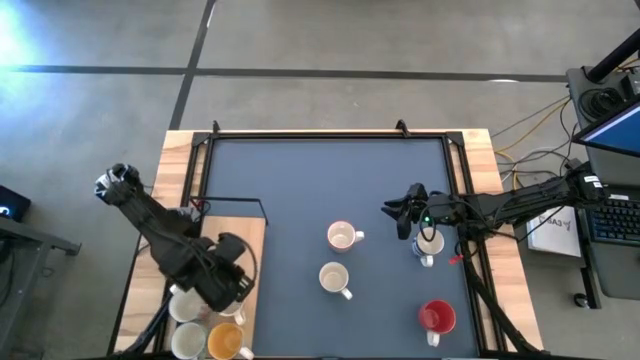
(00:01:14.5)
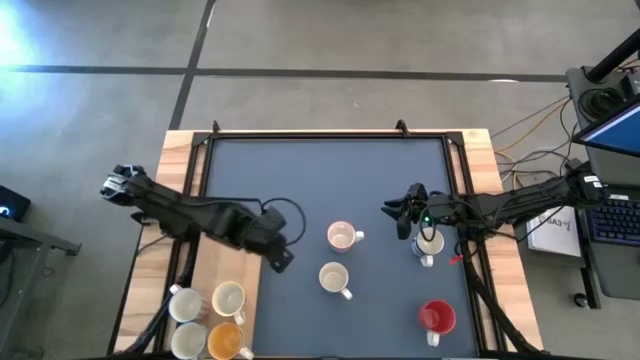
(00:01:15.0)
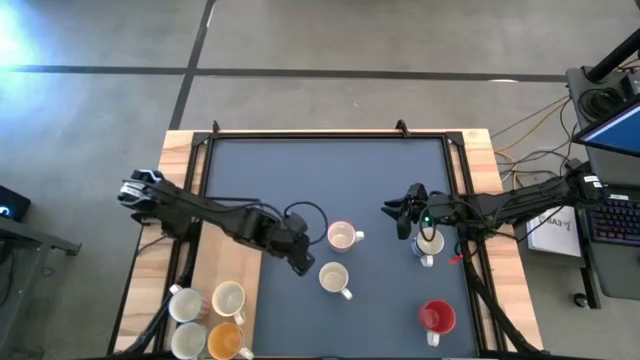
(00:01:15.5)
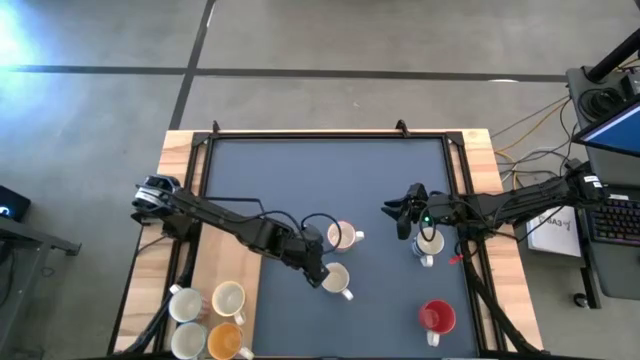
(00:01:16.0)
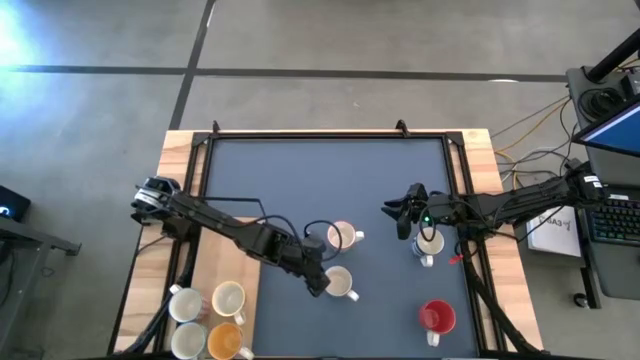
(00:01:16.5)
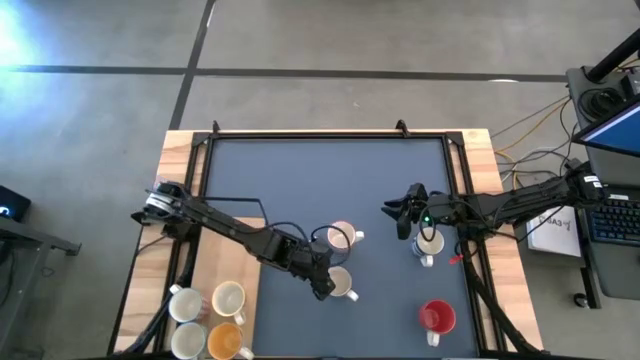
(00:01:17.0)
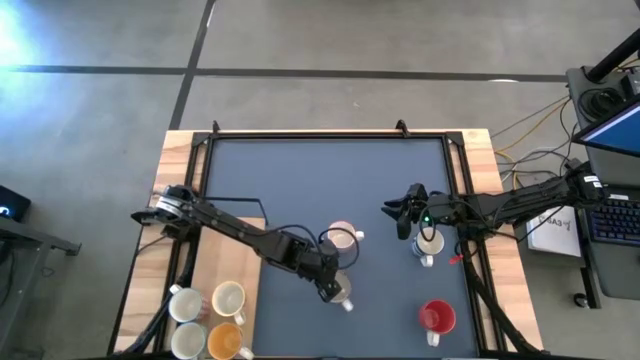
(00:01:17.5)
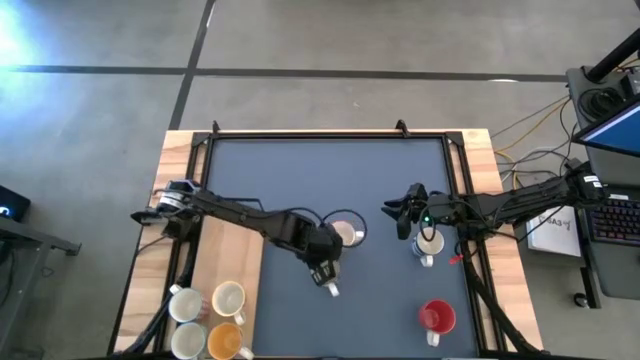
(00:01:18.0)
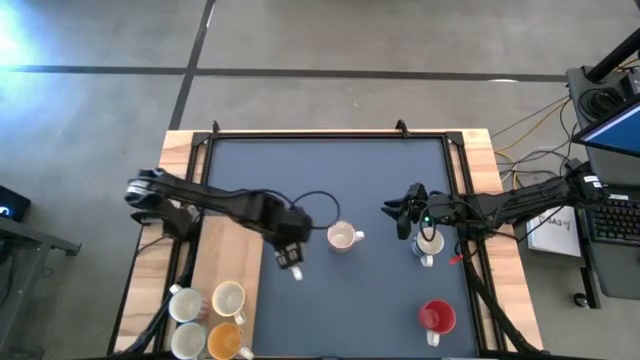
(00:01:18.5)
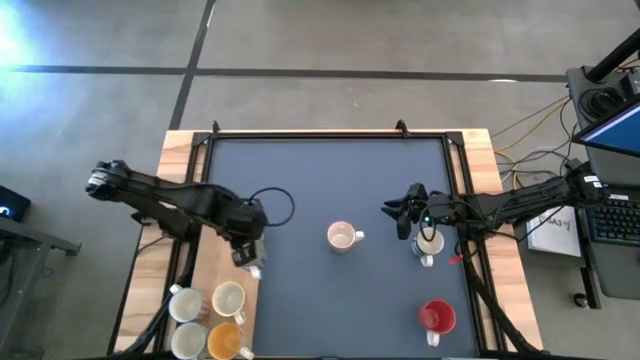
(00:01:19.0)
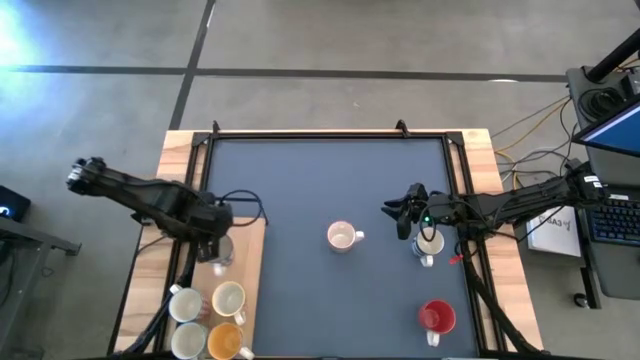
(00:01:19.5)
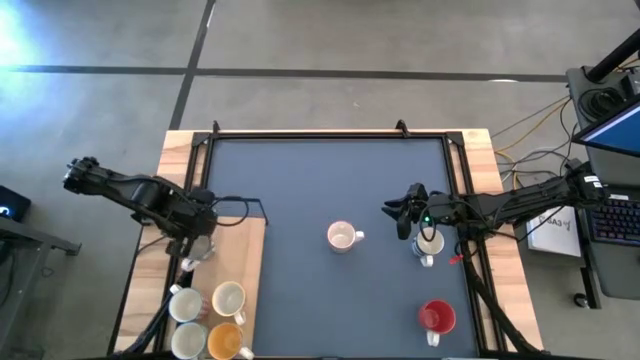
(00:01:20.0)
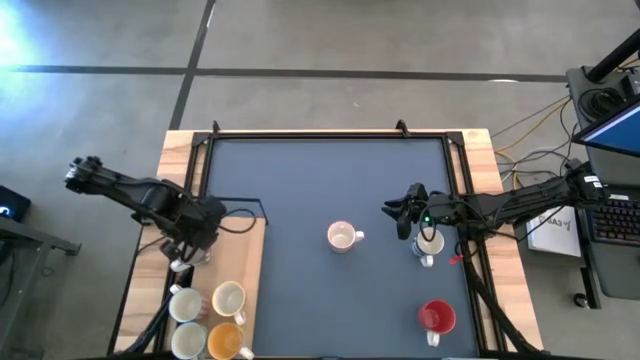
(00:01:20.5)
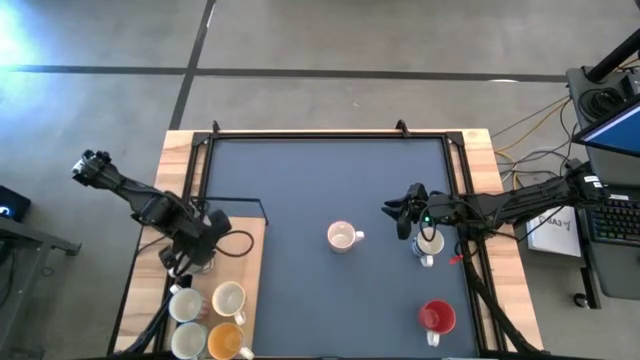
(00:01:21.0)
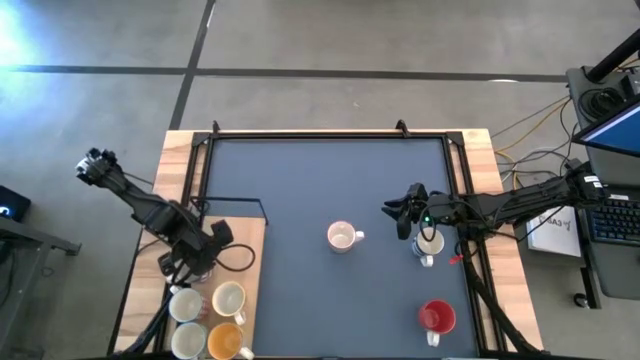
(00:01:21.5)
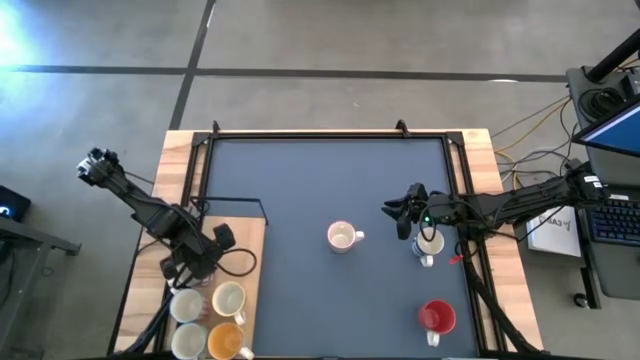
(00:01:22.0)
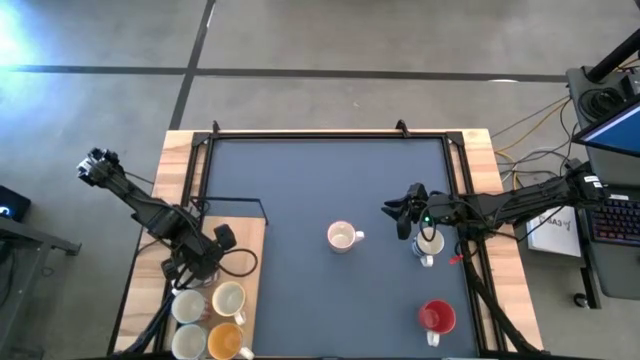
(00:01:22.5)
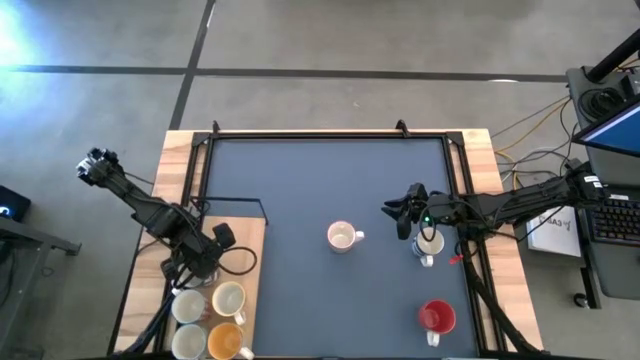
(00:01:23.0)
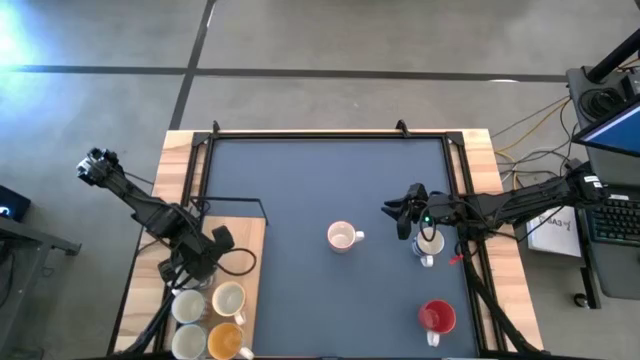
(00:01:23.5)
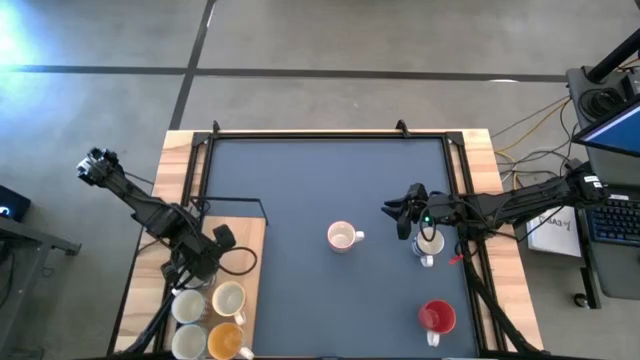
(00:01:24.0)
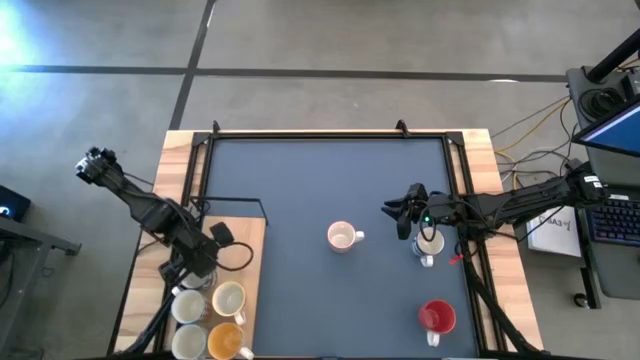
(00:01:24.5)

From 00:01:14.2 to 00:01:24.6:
Task: Place coffee mugs
Put the patterned dark blue mug on the shelf

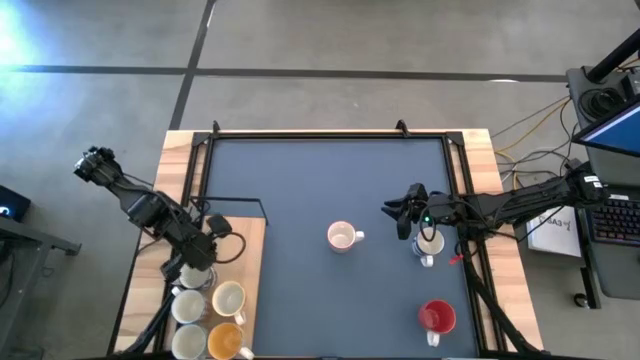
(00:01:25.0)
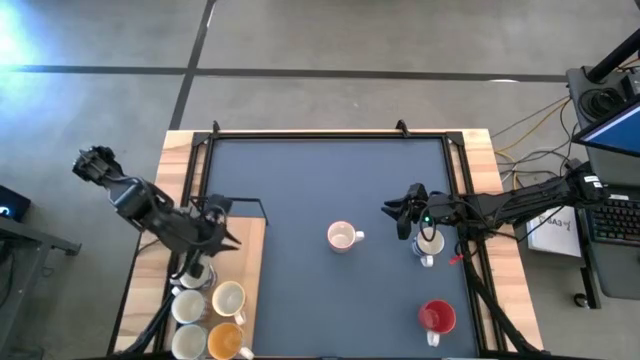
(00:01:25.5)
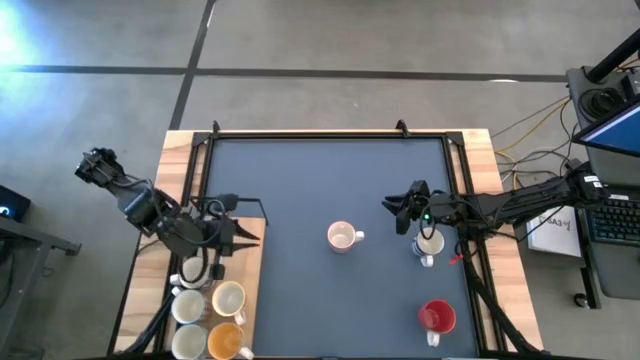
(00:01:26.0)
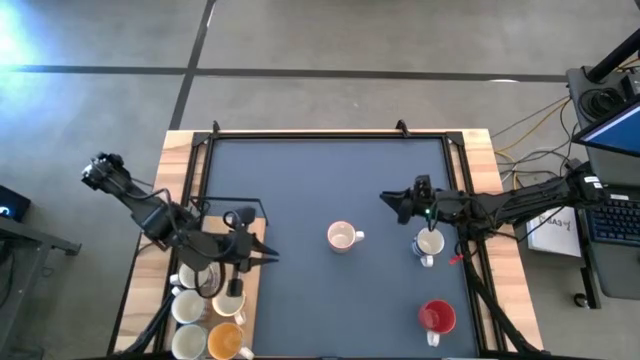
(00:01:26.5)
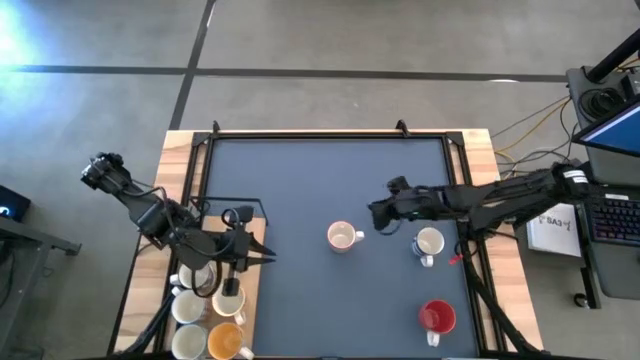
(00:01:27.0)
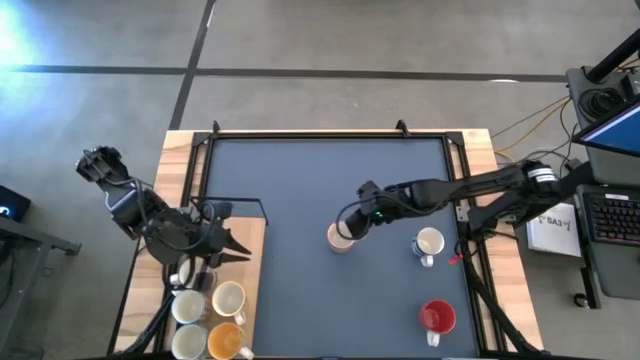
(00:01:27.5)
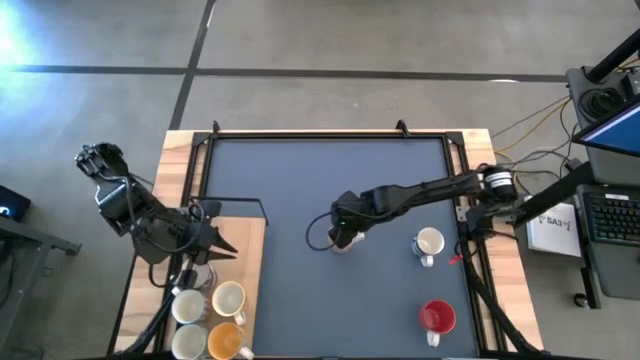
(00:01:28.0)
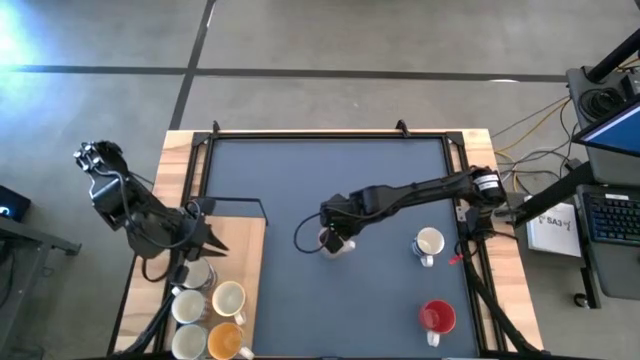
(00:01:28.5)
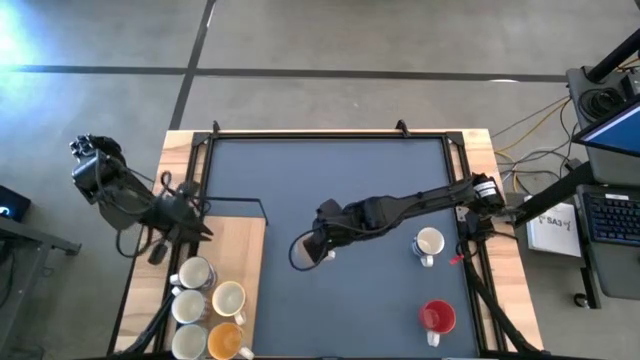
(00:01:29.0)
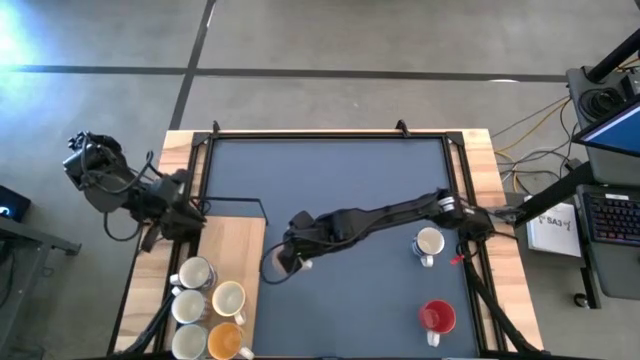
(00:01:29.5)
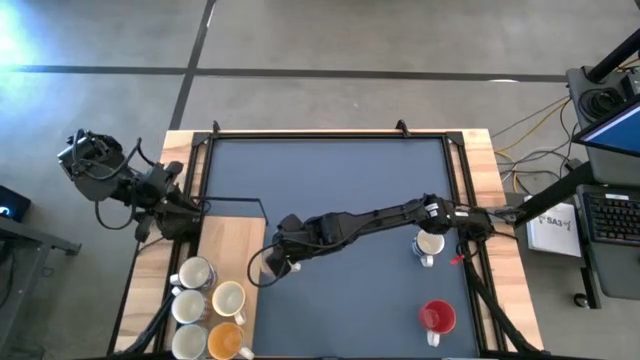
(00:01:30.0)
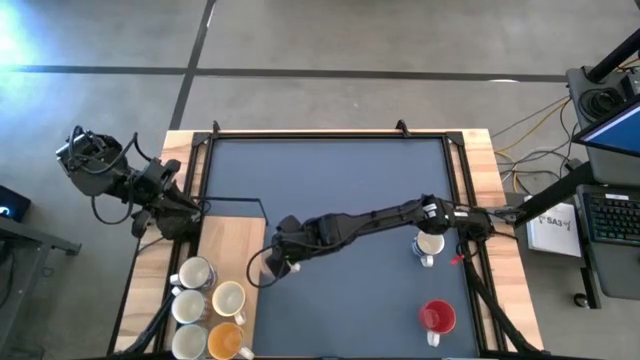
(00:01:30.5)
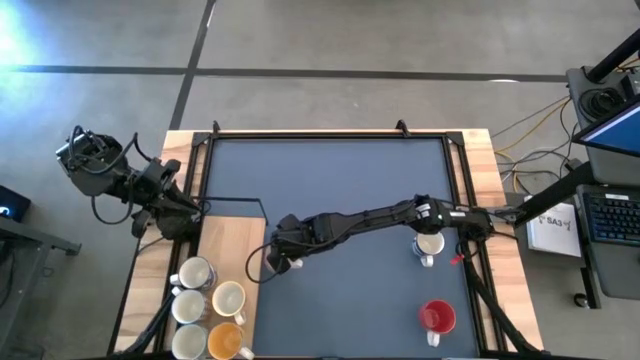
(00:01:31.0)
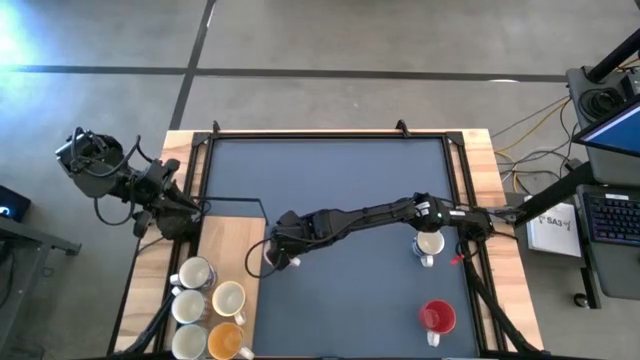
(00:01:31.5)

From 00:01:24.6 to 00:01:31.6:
Move the patterned gray mug to the left of the table

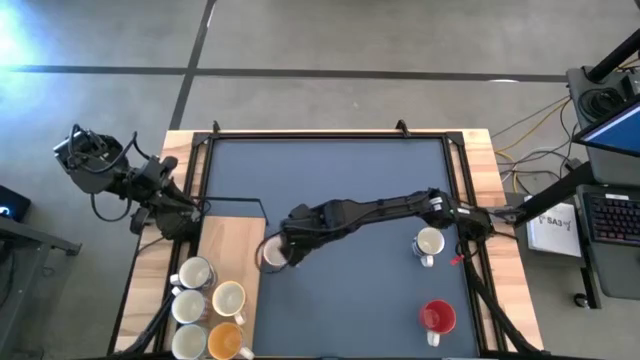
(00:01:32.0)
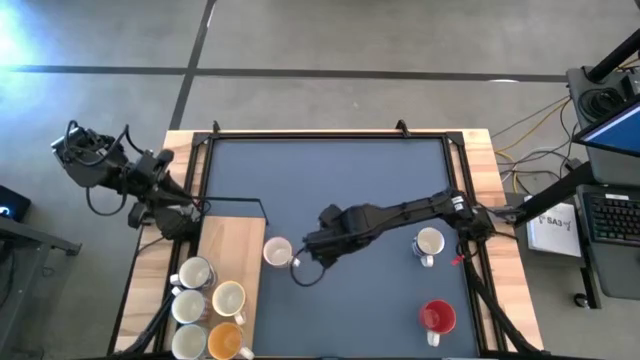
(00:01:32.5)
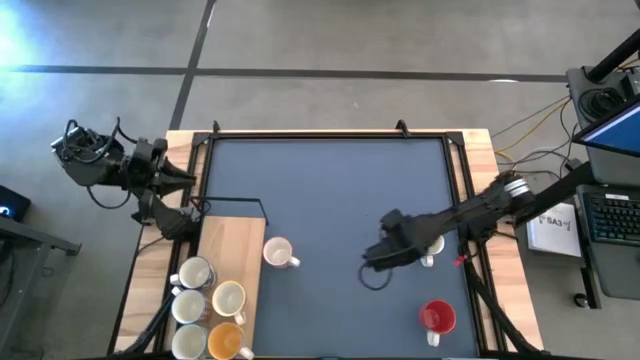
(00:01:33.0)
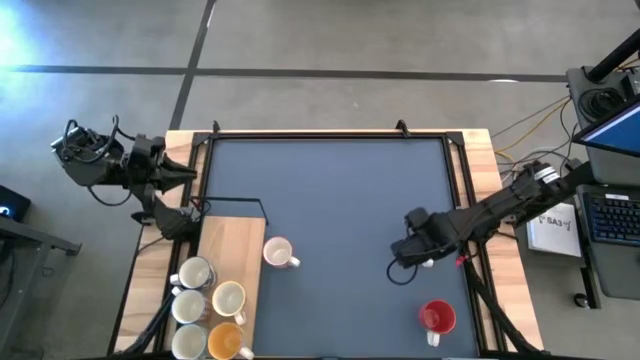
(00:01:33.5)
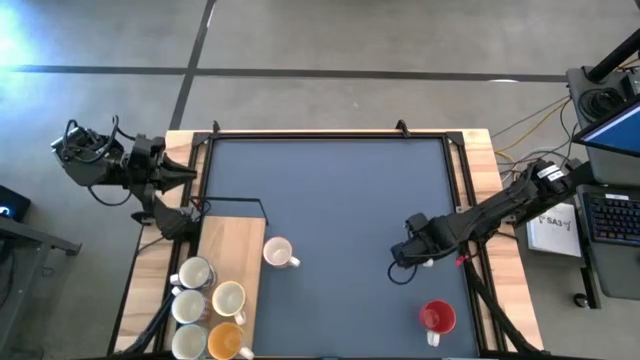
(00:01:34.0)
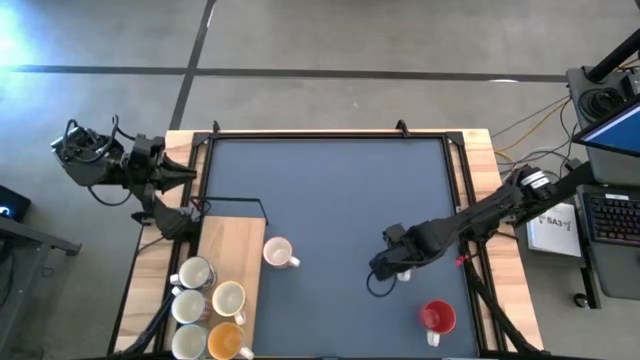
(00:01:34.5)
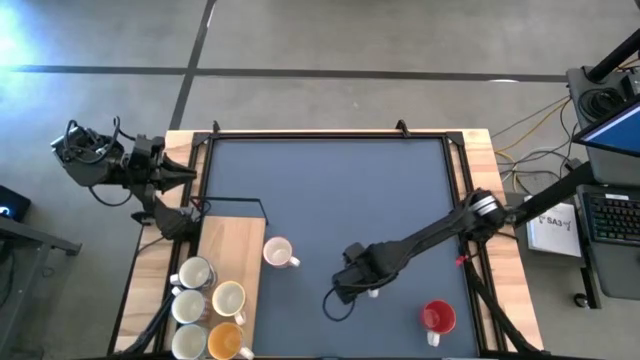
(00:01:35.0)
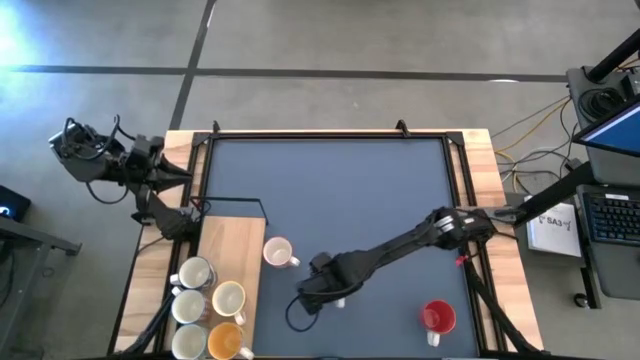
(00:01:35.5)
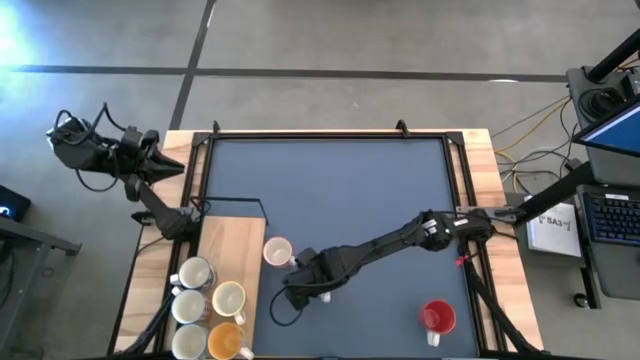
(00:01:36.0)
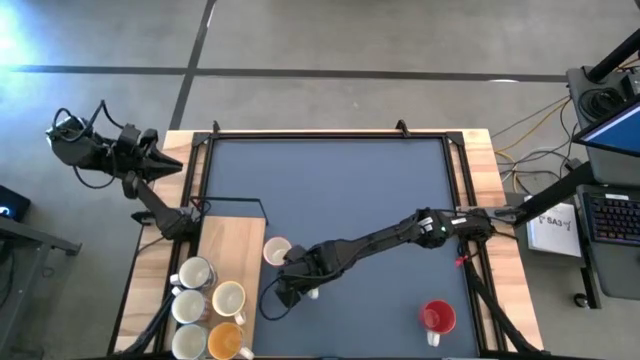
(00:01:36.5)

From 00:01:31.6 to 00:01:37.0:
Move the patterned blue mug to the center of the table
